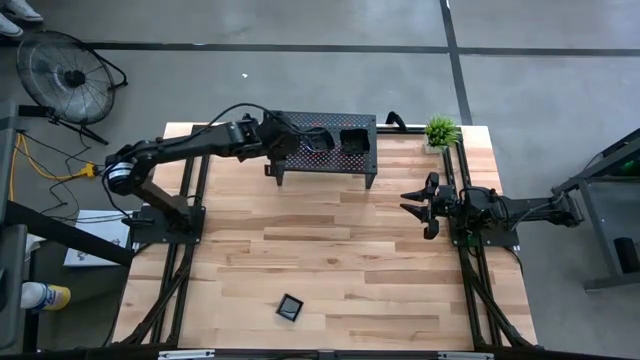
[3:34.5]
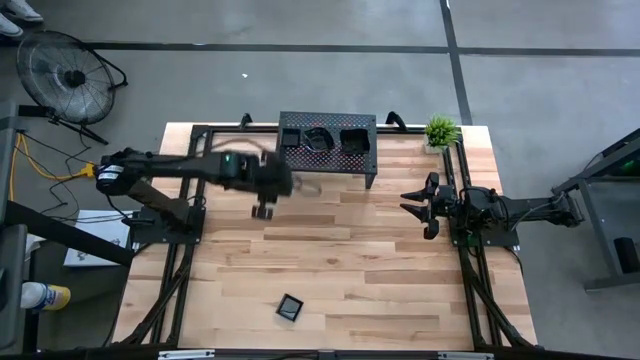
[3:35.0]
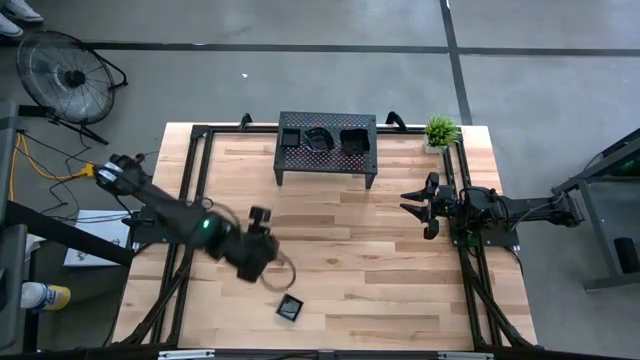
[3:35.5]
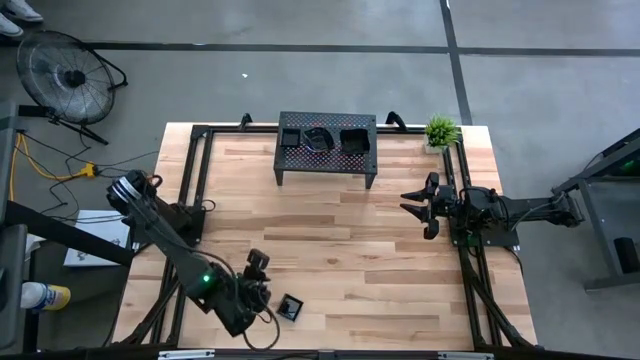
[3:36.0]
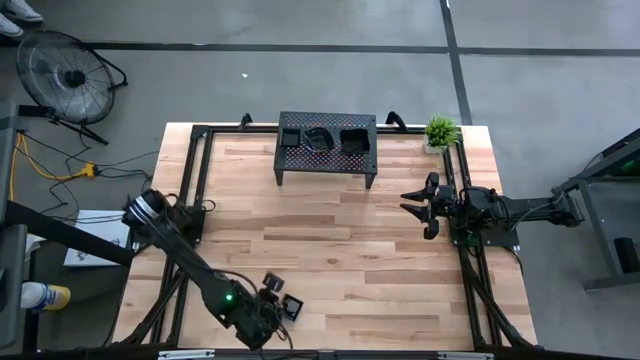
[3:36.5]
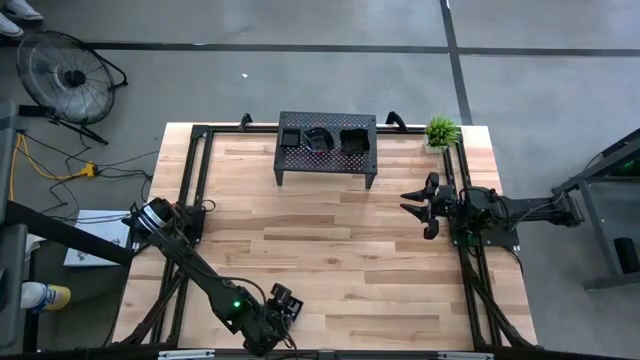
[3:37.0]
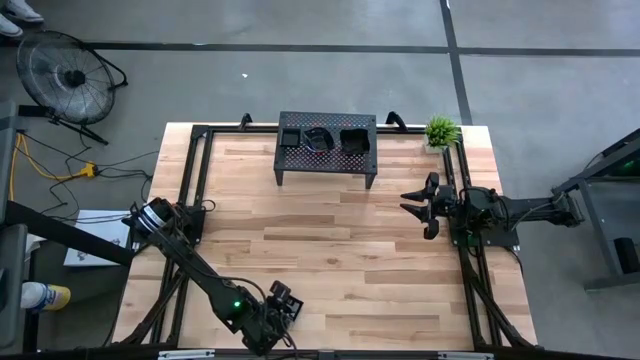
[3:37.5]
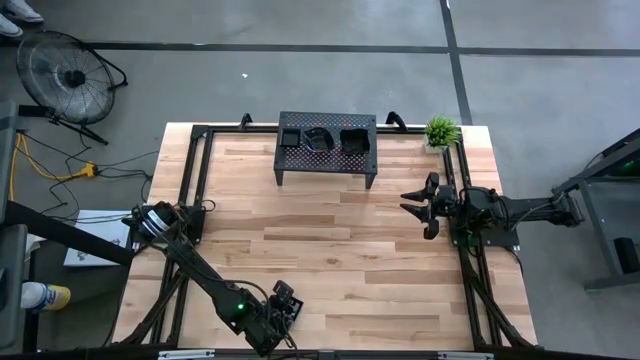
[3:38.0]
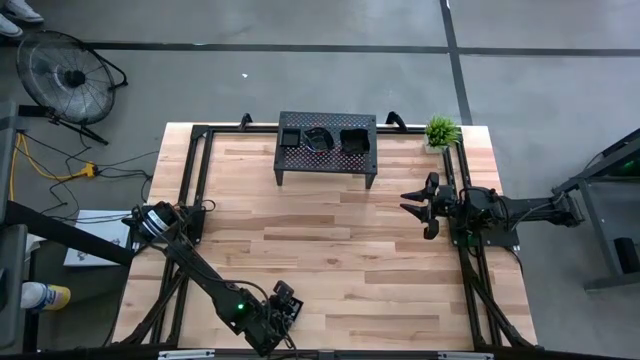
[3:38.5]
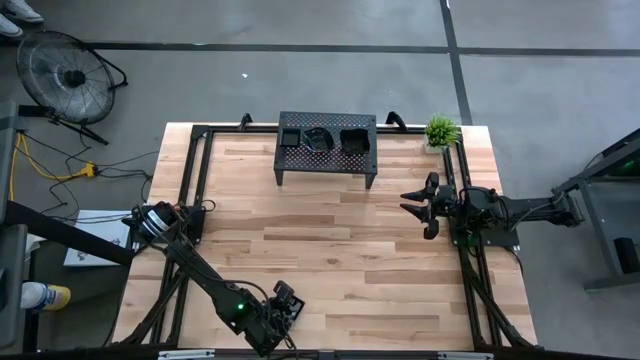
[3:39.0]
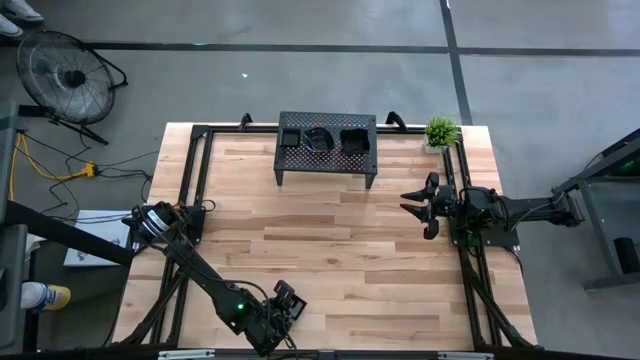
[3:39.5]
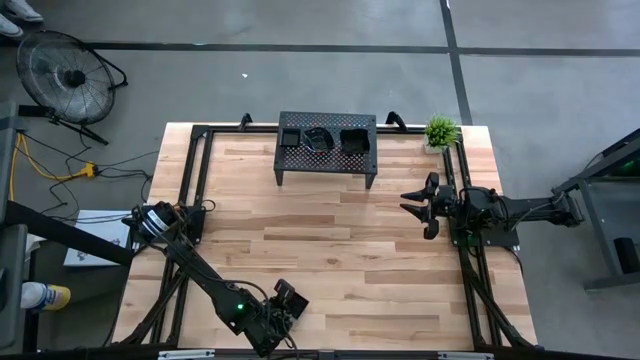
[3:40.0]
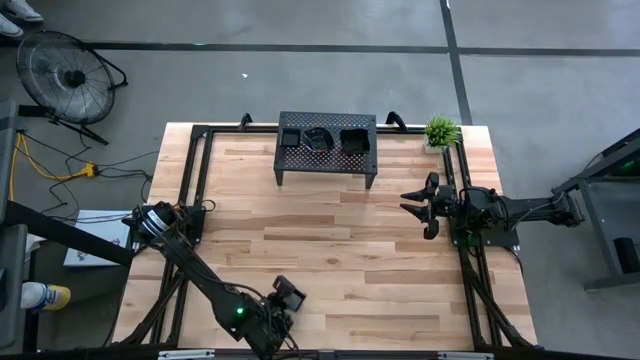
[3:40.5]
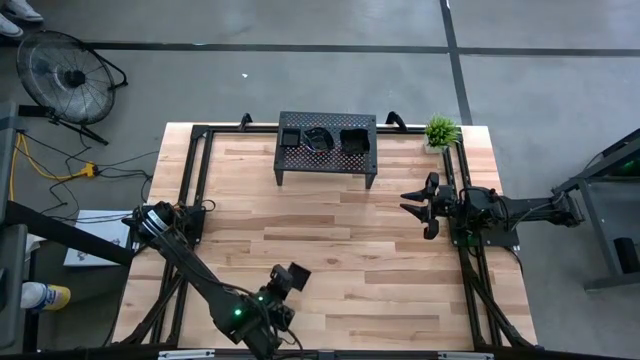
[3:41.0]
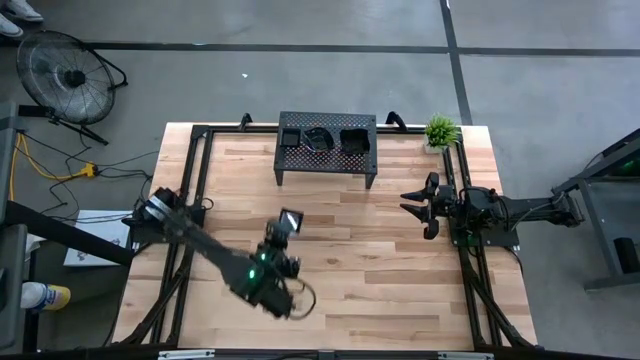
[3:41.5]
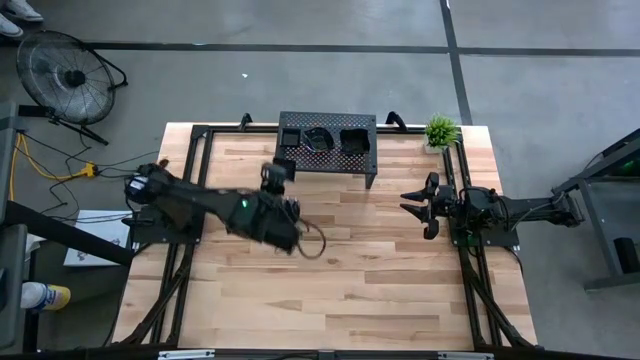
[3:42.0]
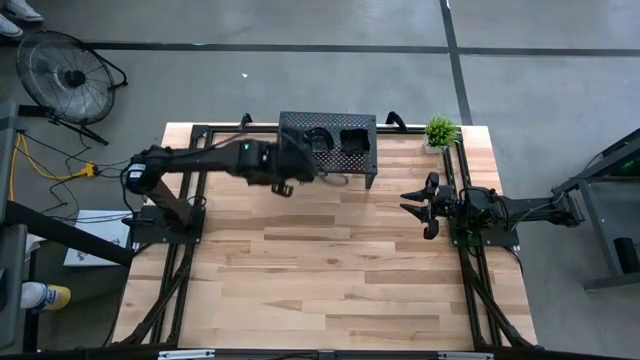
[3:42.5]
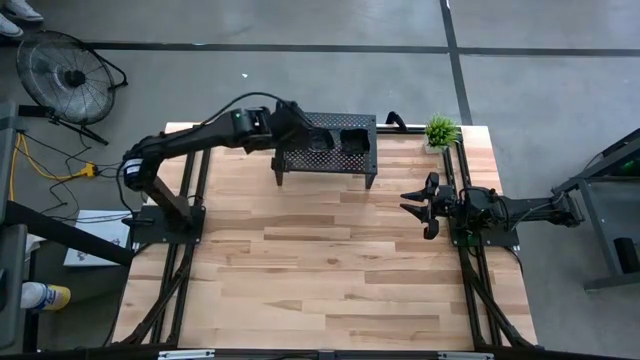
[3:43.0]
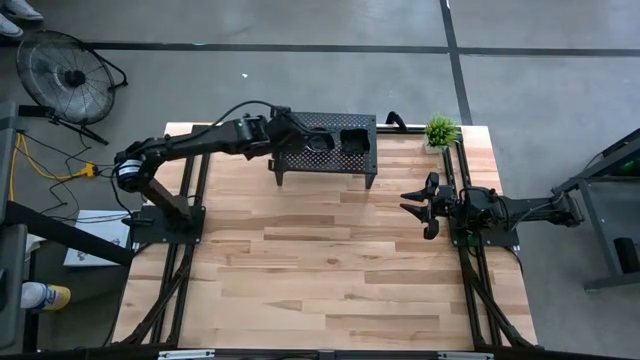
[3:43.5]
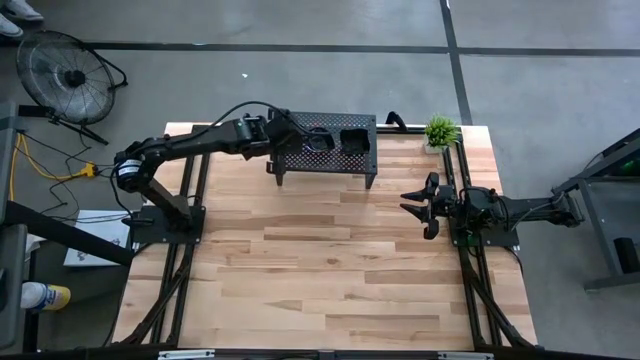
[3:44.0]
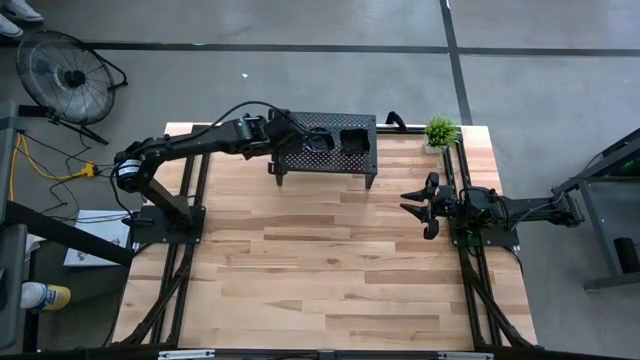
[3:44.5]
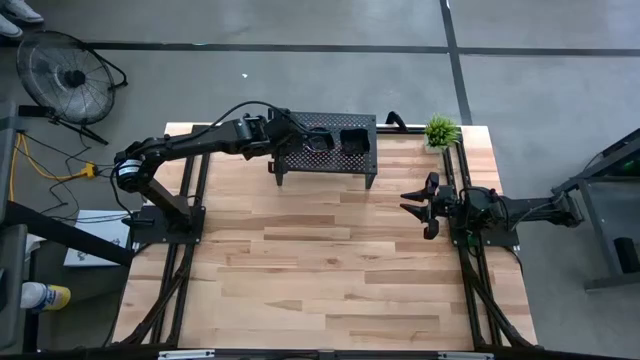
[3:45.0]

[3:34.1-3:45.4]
Task: Pick & Place Mini shaped plates
Stack the black square plate on top of the black square plates on the shelf

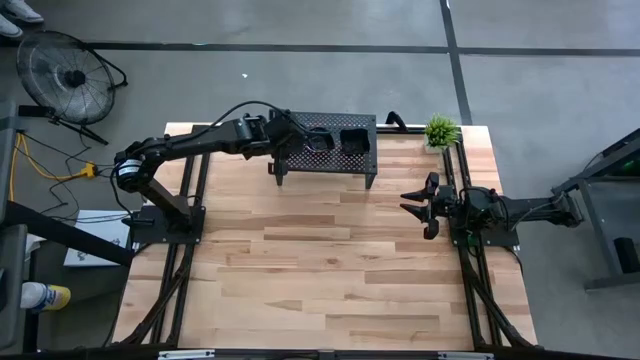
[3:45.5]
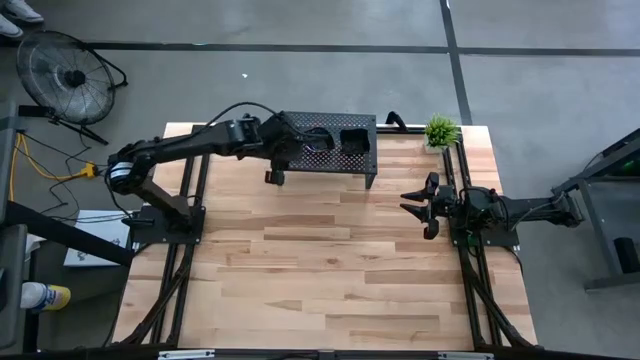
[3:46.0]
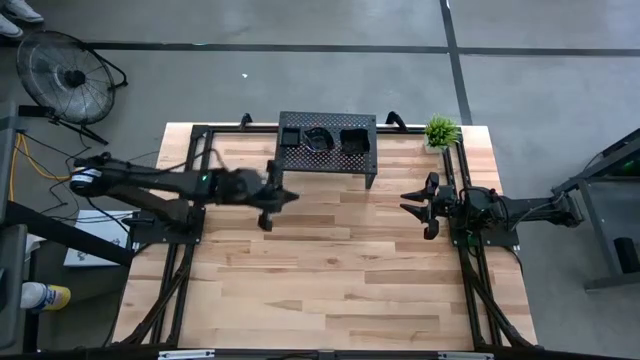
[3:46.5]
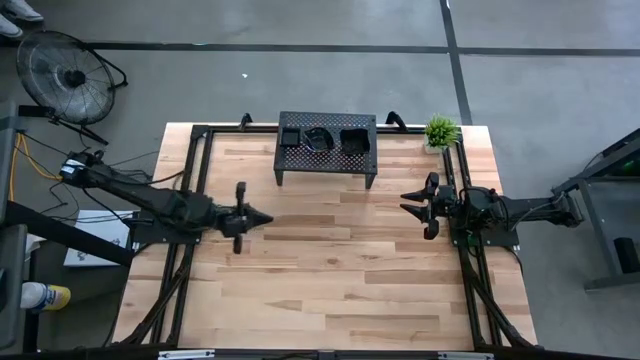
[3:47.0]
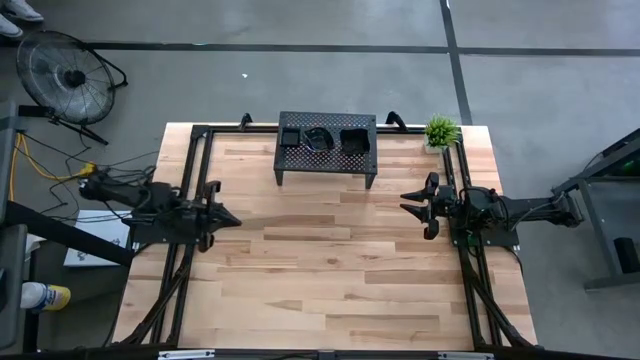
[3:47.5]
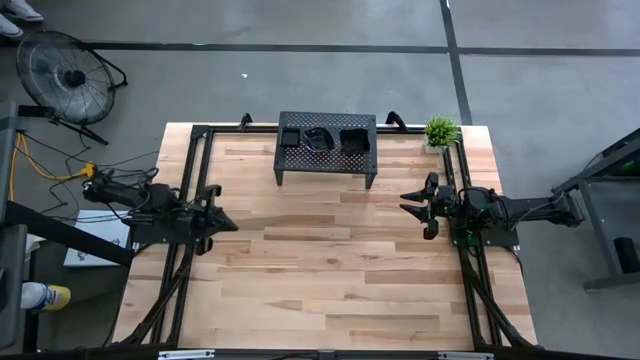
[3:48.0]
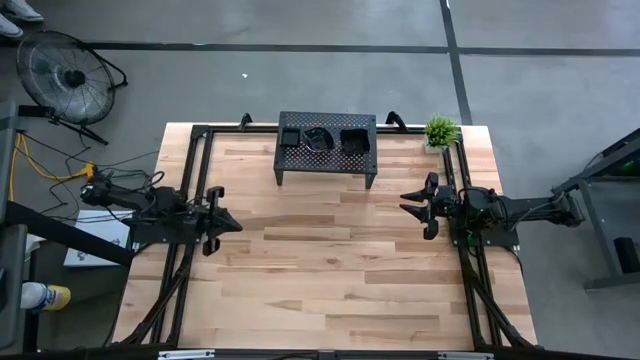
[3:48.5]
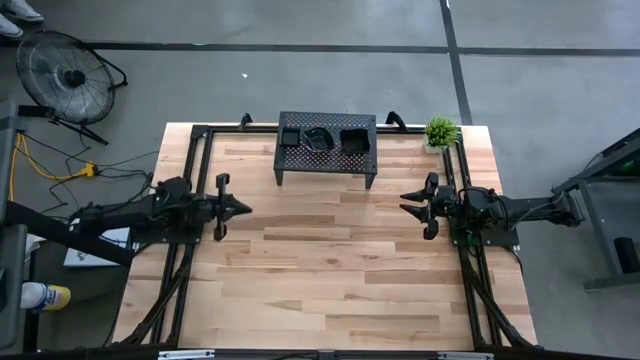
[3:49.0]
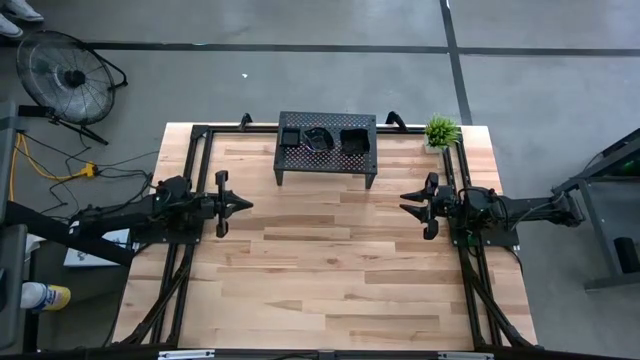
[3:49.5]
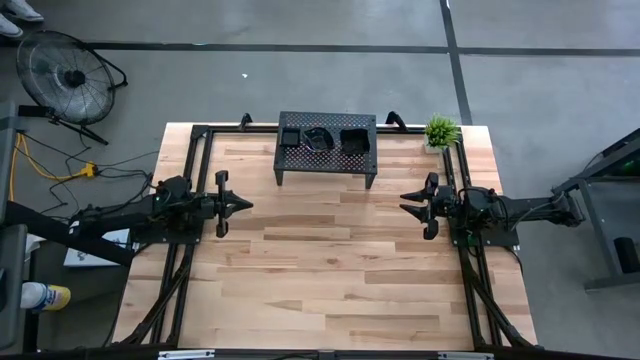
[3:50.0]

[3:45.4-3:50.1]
Return to Home Position

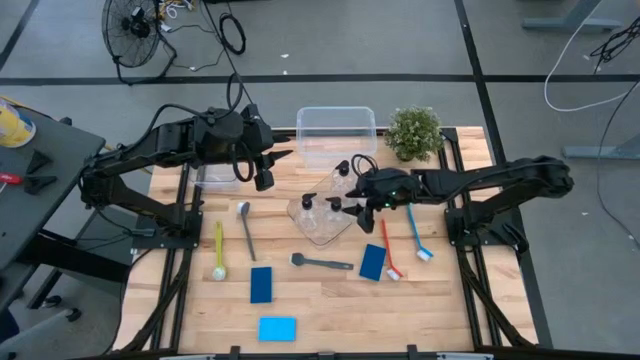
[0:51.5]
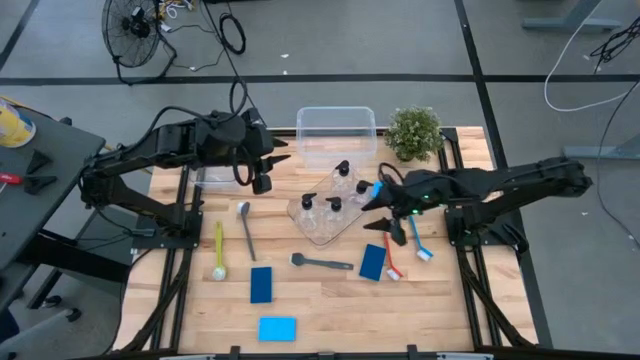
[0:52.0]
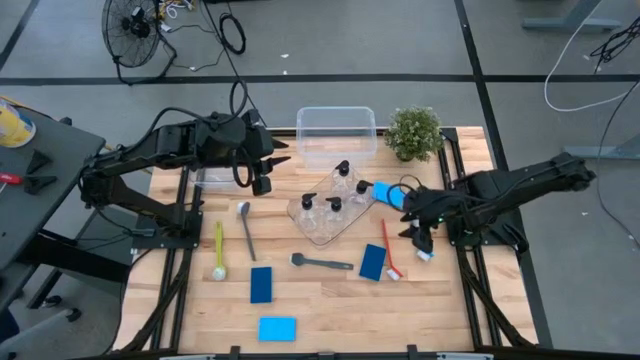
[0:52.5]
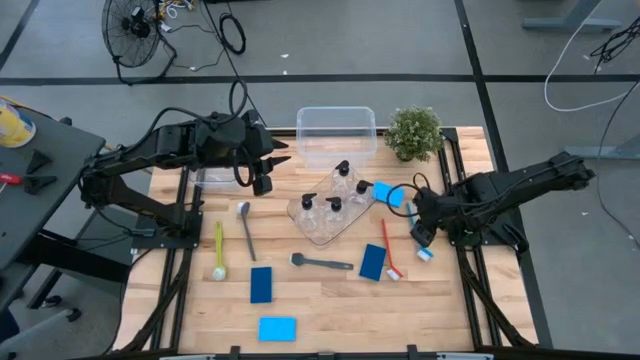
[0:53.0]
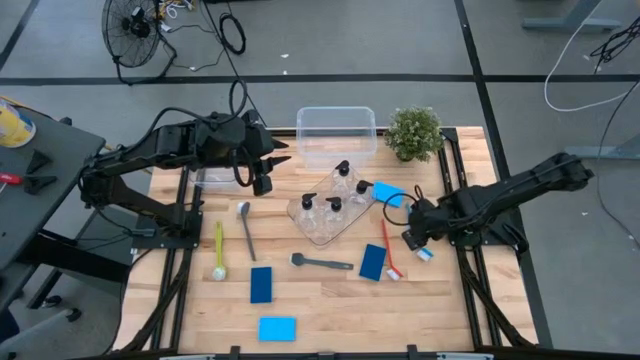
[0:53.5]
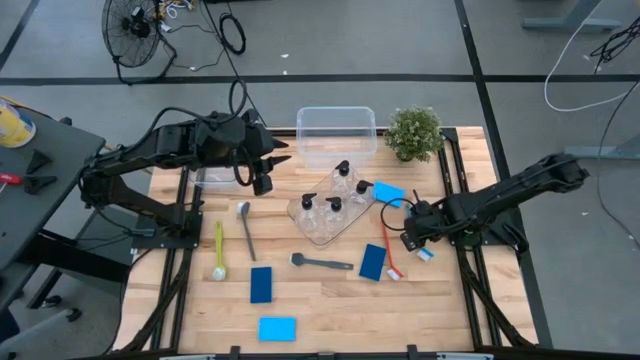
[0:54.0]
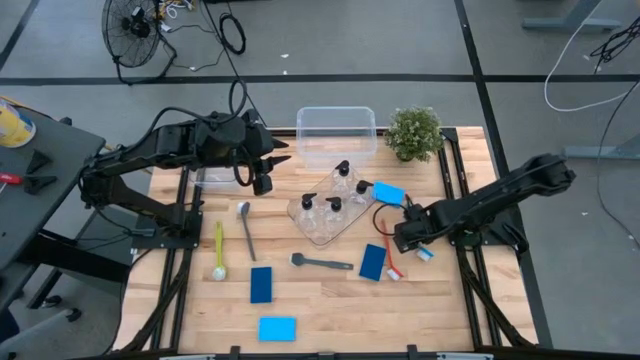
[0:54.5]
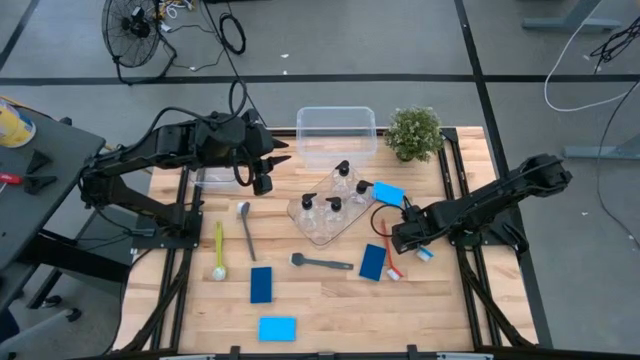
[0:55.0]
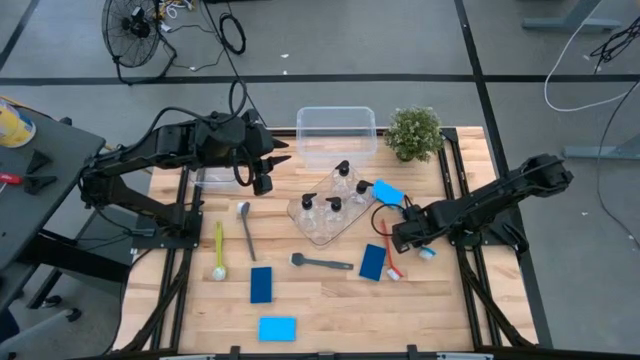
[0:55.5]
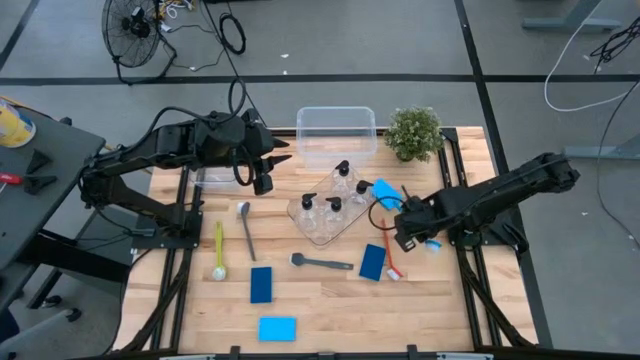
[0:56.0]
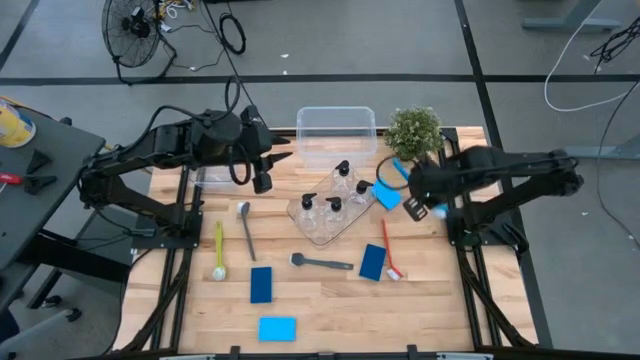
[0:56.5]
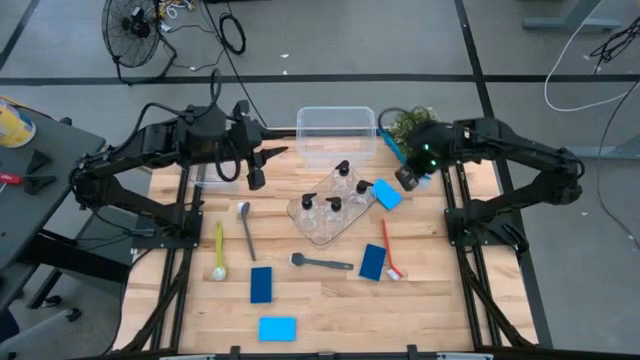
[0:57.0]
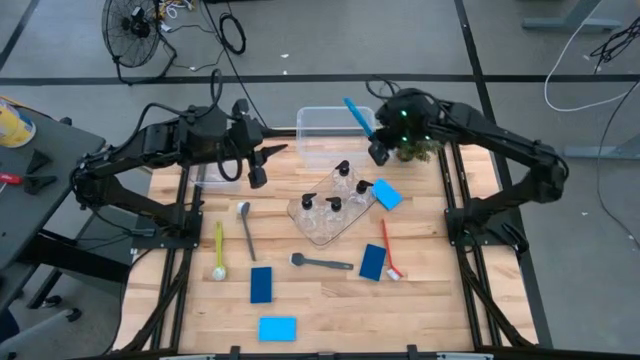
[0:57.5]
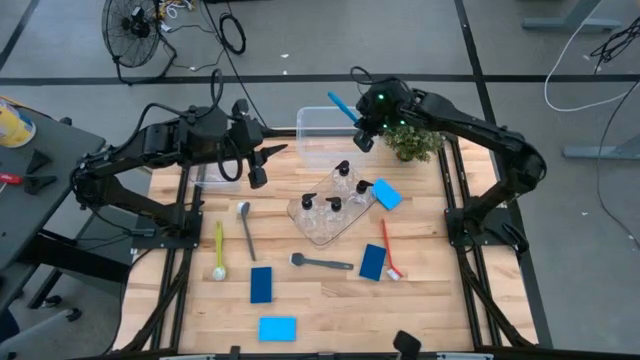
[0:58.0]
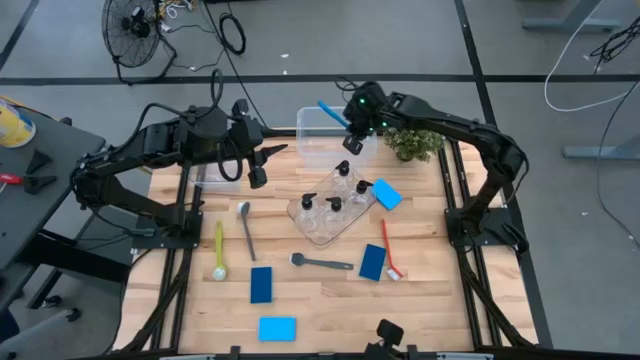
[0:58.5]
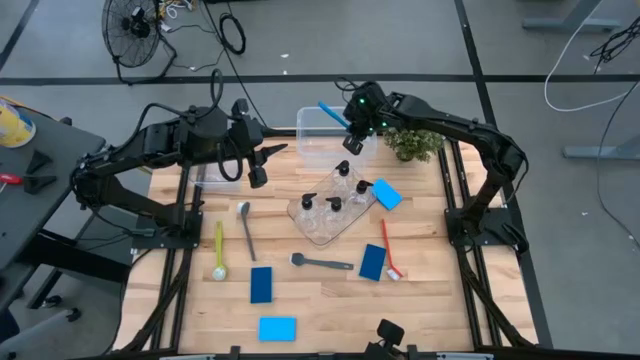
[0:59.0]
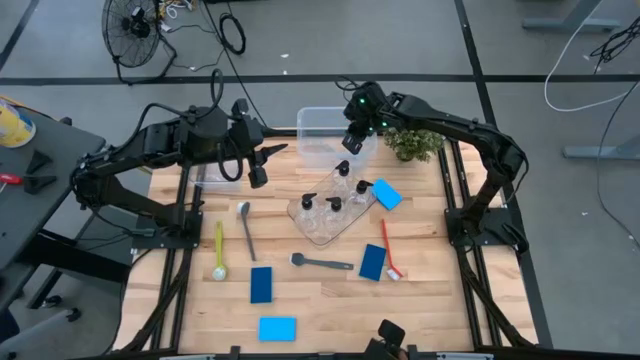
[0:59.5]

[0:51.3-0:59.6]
Task: Pick & Place Kitchen Sink Supplies
Put the blue dishwashing brush into the transparent container
